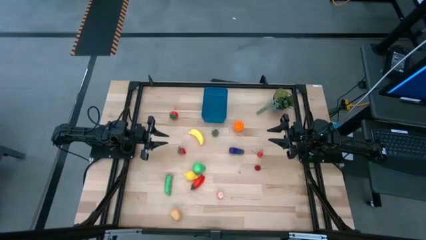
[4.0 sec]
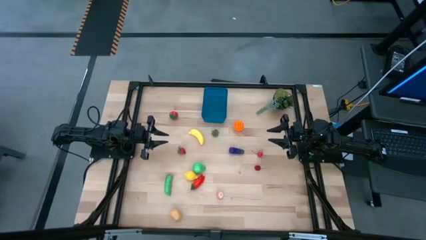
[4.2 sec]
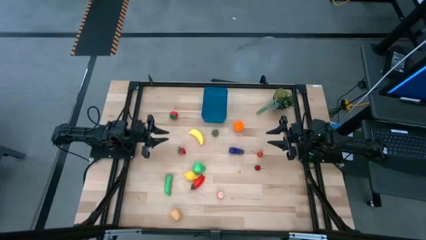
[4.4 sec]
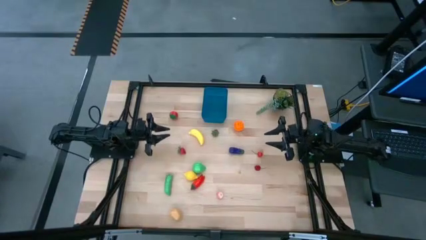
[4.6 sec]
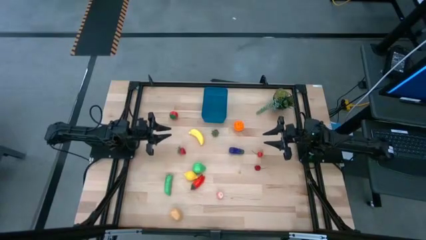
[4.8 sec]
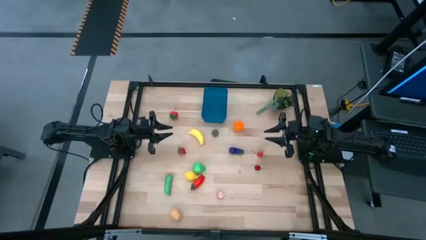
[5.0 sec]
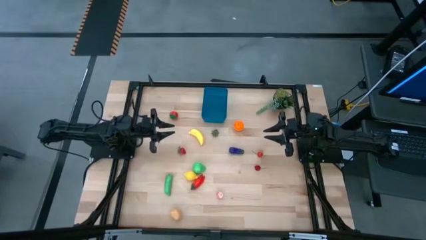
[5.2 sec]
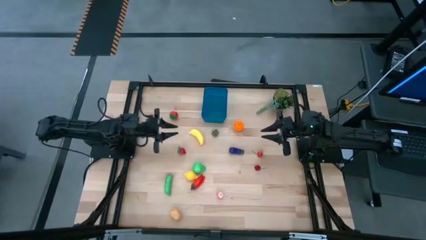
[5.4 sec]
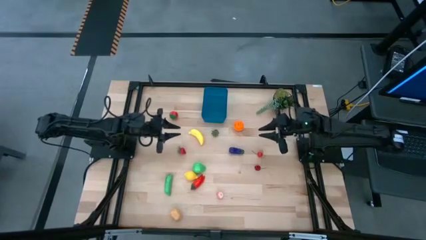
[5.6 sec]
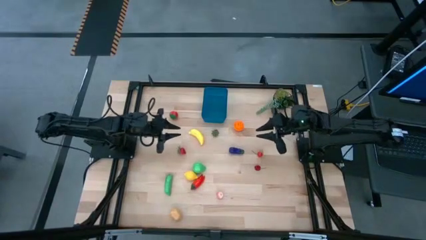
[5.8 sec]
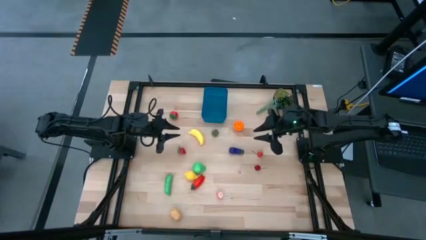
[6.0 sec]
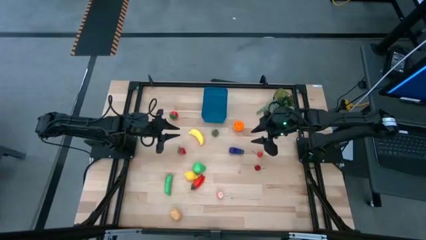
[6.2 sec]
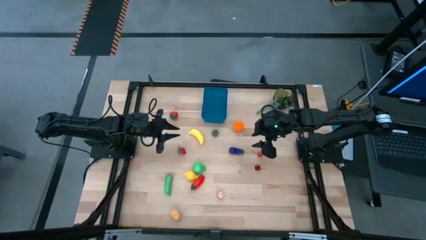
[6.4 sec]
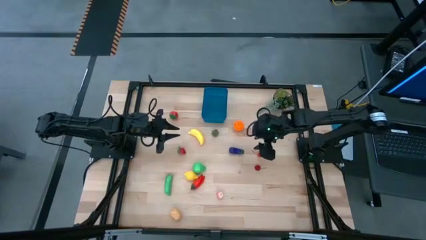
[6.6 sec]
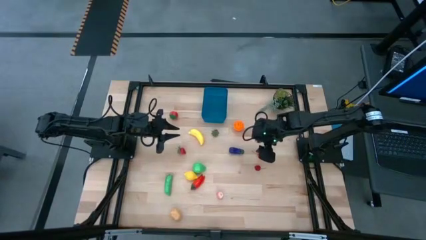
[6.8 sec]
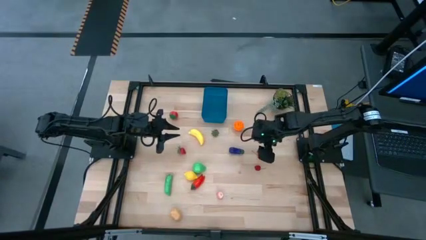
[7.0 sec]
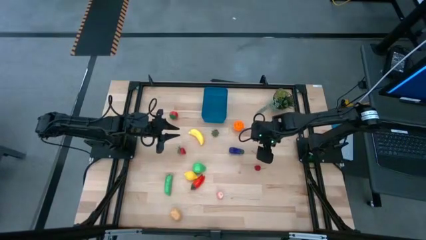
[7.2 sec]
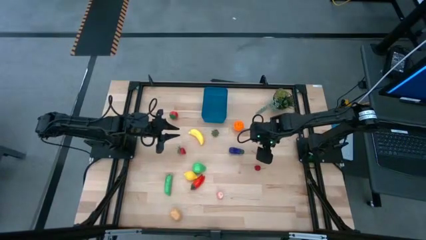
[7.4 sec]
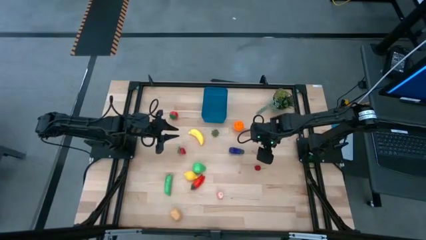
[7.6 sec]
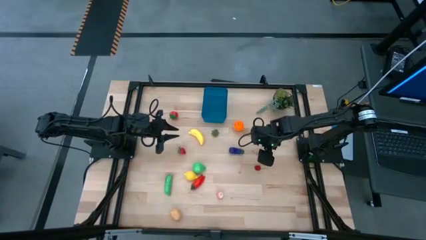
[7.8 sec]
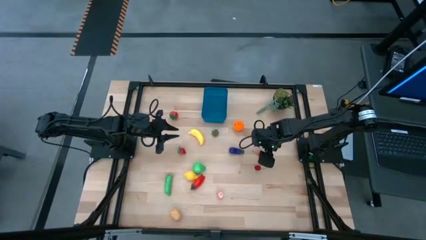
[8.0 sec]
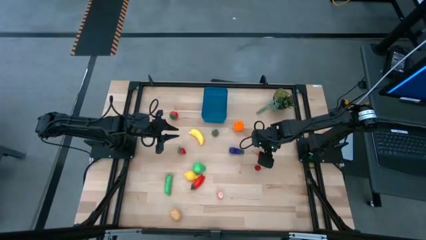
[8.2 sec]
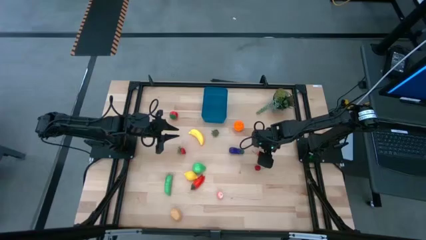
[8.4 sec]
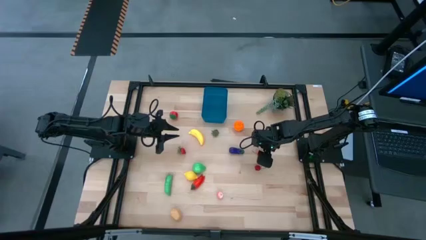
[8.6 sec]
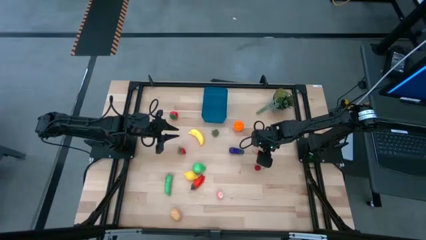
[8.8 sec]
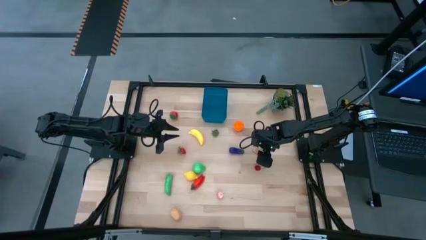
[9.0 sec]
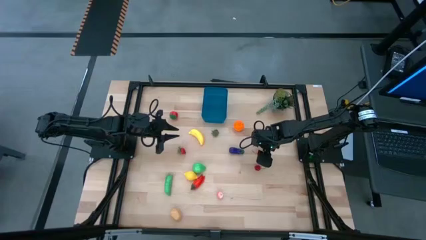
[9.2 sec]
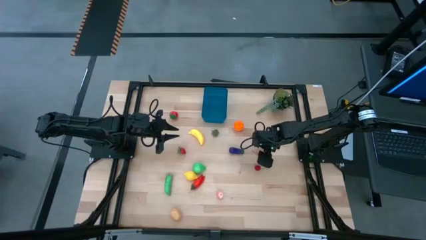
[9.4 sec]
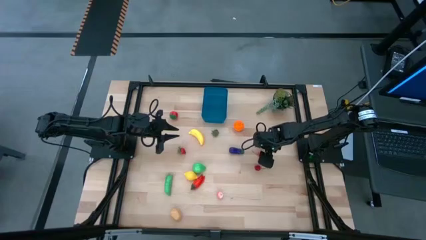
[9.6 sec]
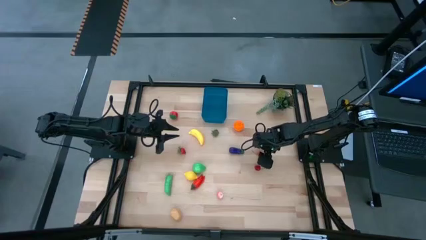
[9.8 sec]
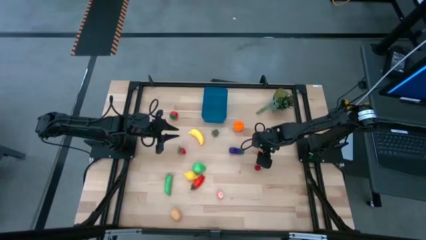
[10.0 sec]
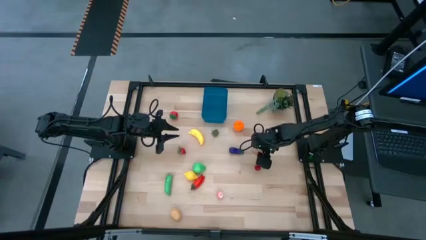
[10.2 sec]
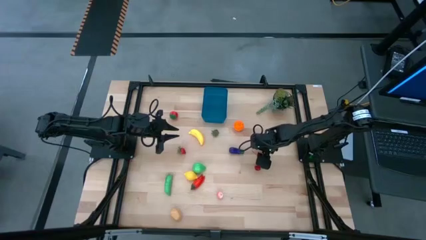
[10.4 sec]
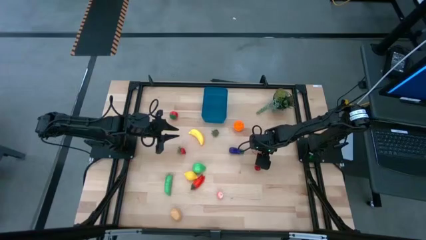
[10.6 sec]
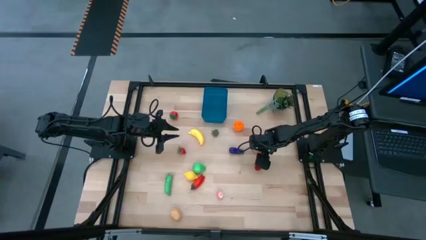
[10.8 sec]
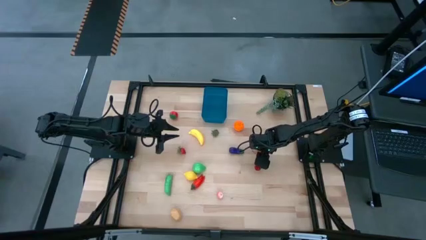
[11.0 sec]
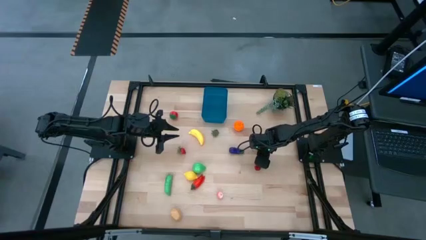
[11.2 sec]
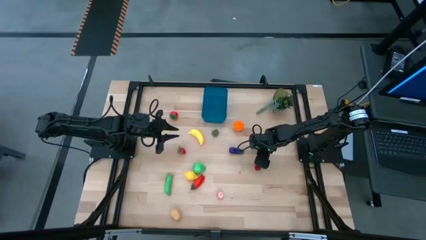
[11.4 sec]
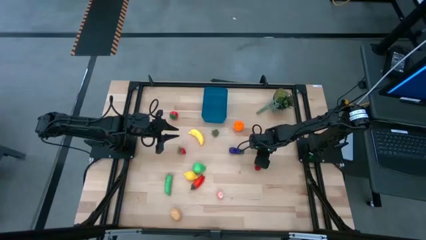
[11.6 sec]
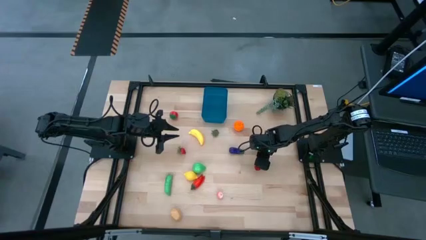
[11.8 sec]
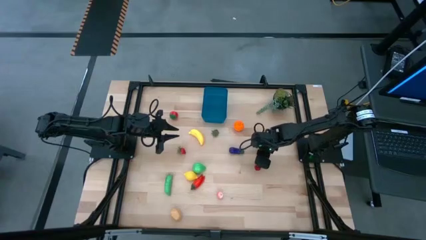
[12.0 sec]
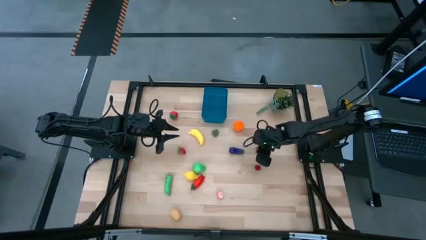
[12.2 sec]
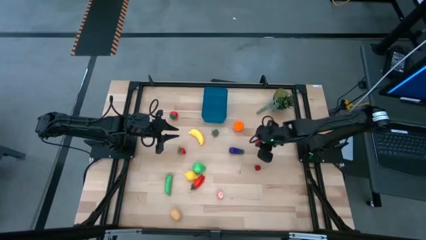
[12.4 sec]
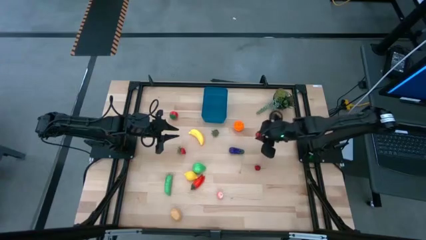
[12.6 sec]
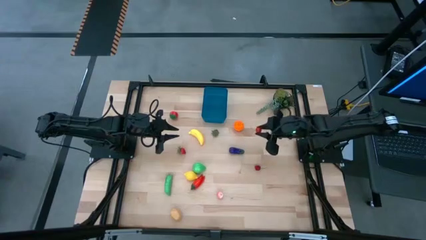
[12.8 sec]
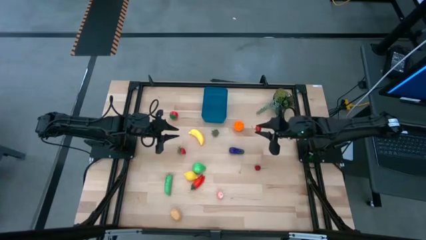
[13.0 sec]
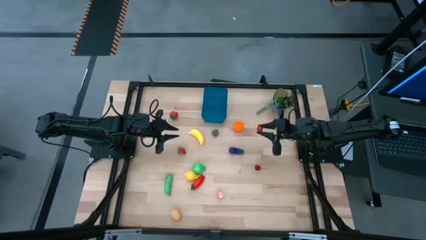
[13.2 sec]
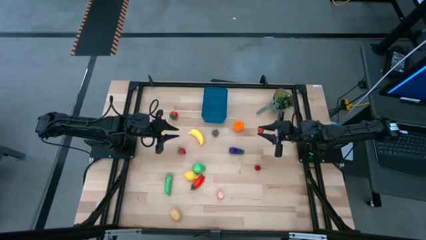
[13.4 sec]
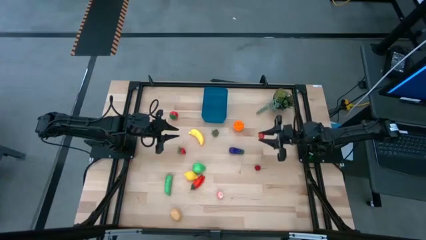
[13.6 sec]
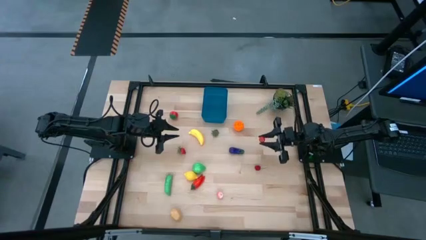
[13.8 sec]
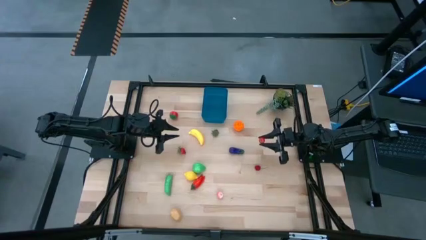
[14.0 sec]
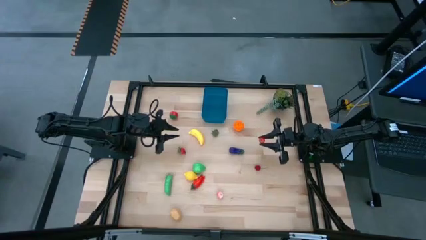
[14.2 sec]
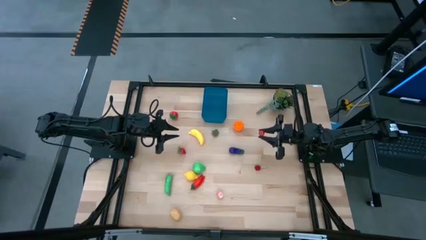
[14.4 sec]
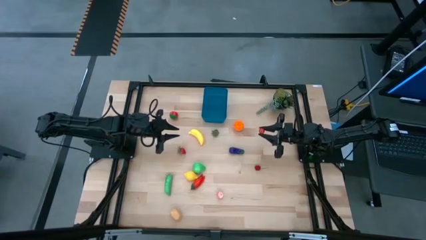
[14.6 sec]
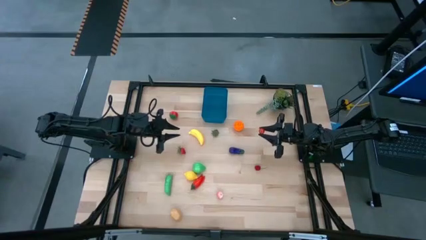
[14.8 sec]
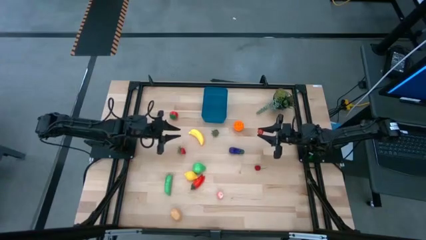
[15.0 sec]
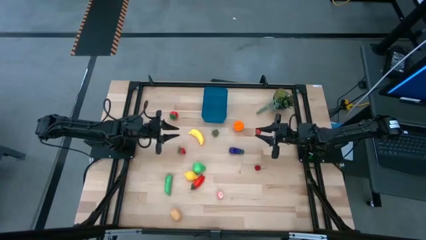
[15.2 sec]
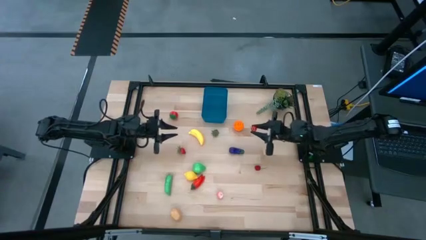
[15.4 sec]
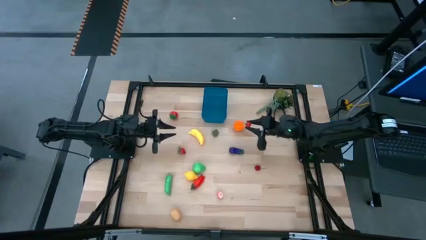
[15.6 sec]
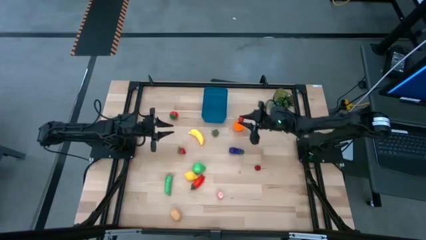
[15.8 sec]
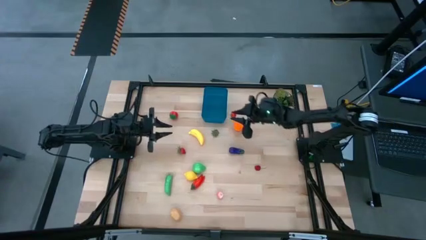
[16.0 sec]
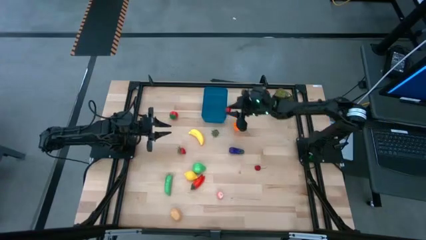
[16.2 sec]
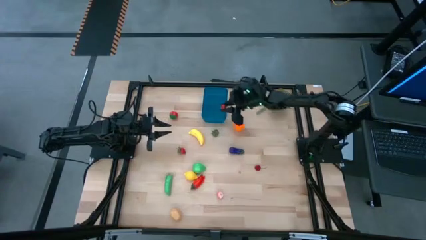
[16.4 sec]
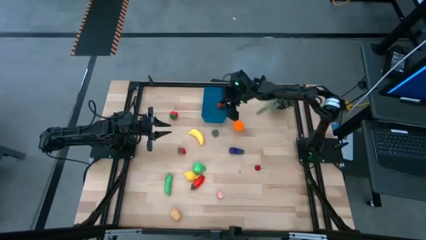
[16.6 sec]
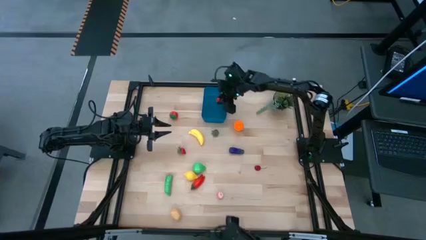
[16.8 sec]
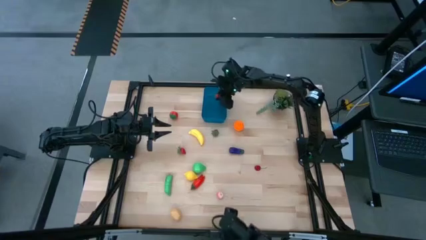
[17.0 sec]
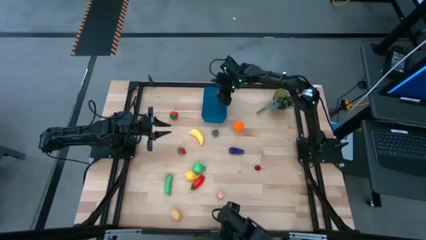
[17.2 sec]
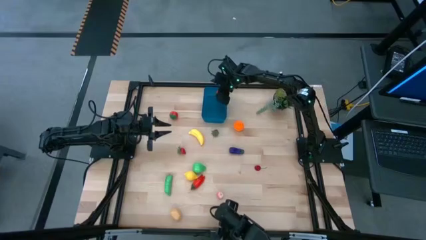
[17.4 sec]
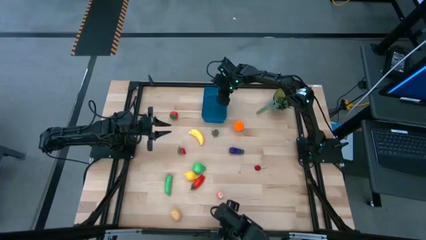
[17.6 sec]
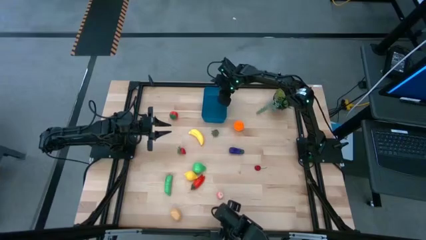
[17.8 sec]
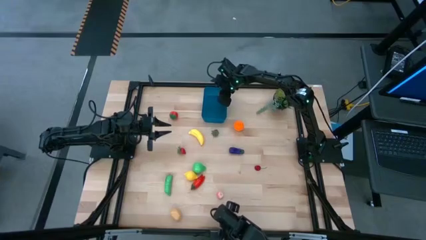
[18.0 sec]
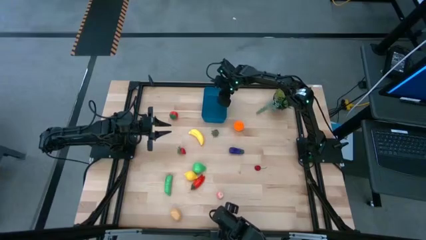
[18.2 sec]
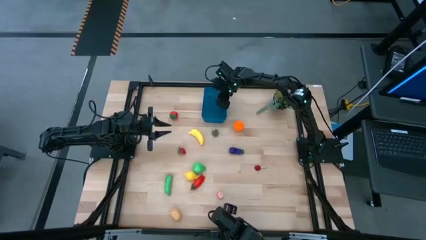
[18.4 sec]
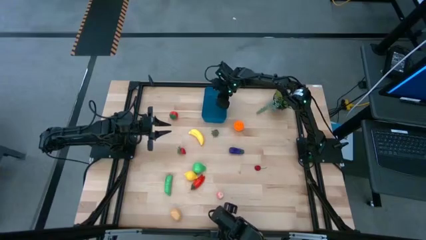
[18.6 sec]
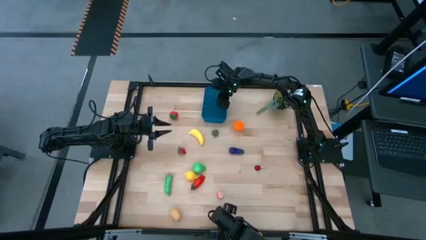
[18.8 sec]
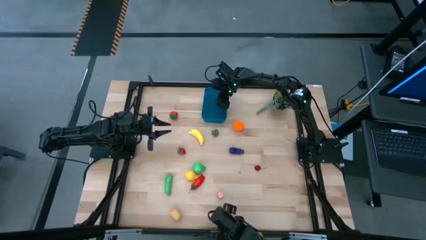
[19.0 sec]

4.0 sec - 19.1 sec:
Task: Pick and placing Produce into tupperware
Put the top cherry into the blue bin
